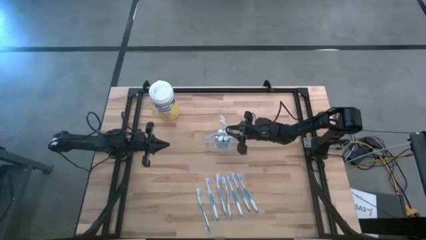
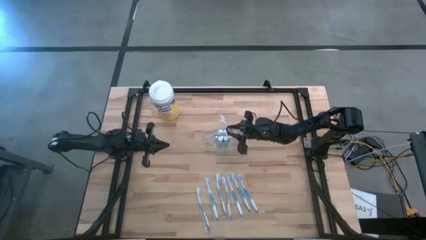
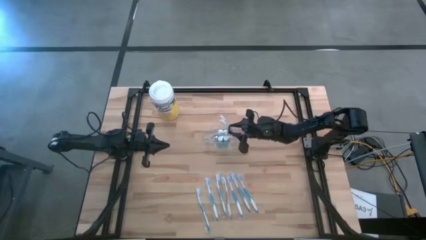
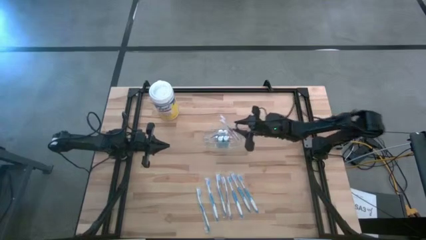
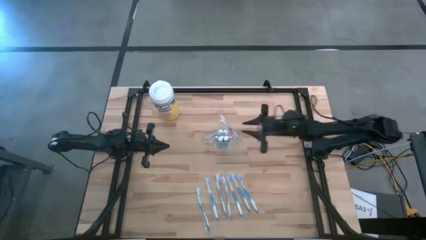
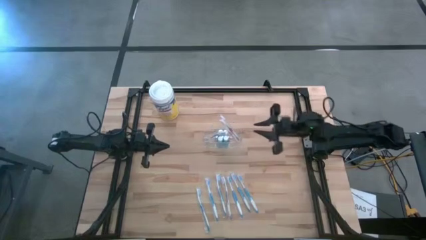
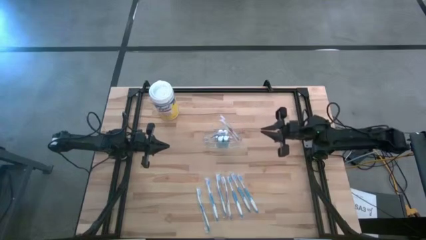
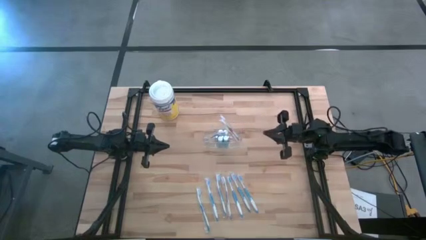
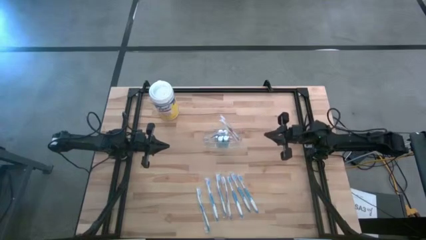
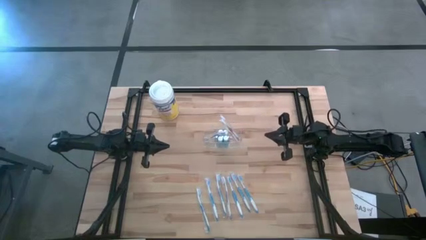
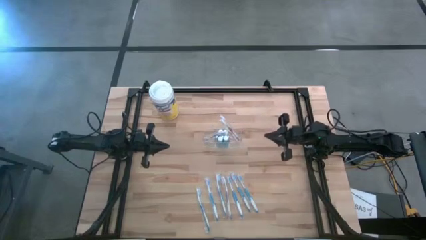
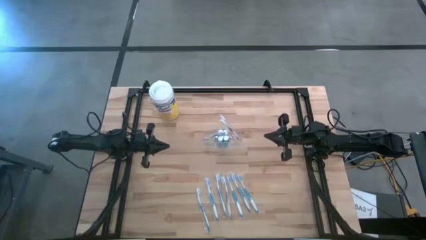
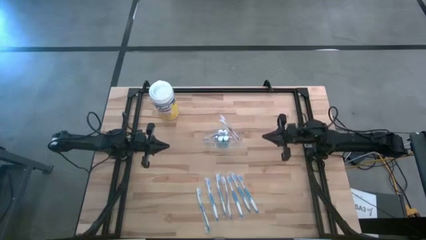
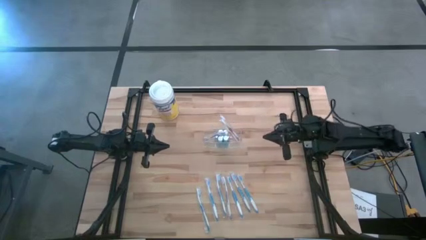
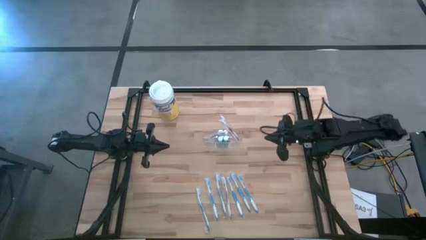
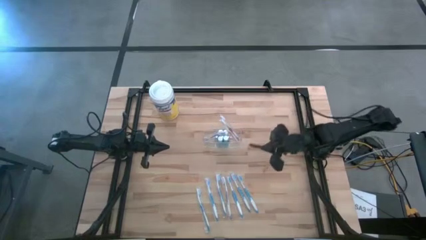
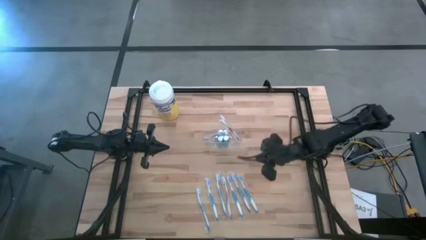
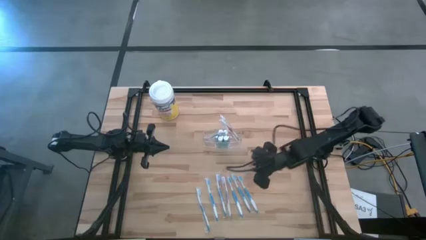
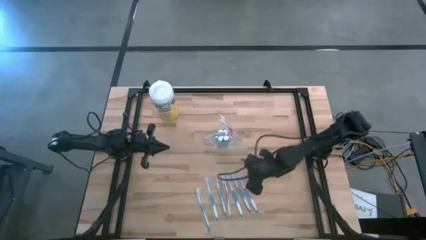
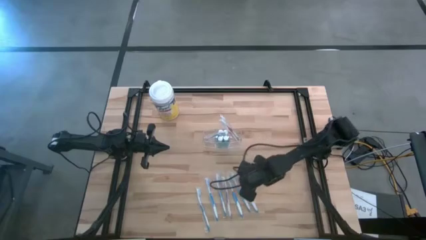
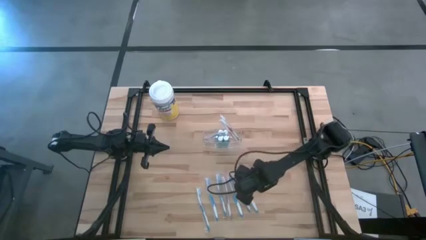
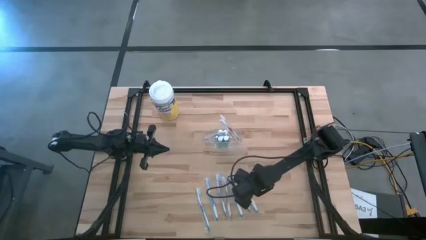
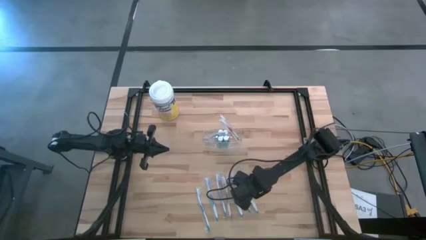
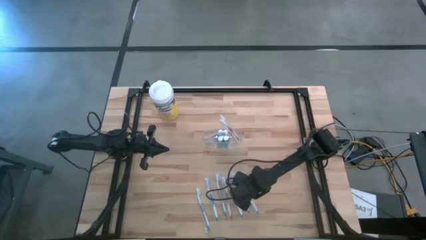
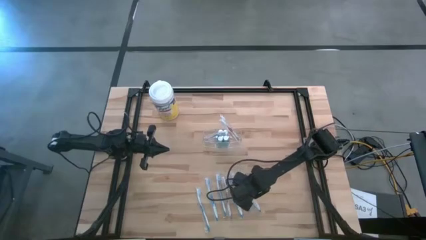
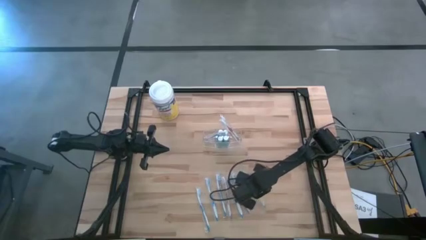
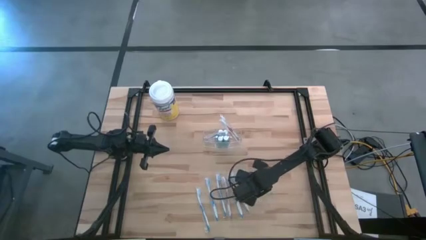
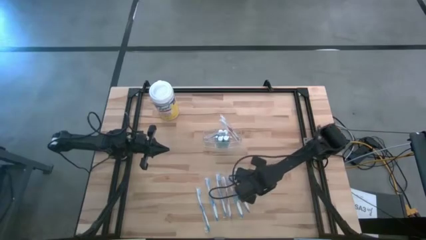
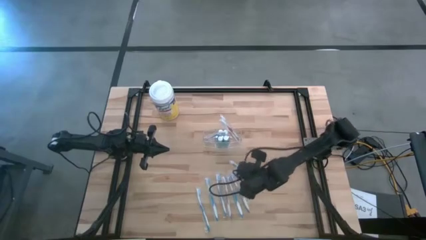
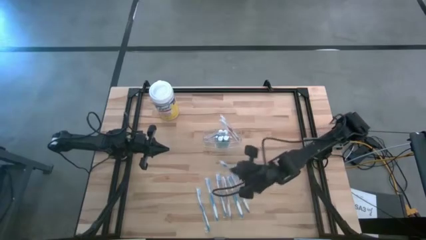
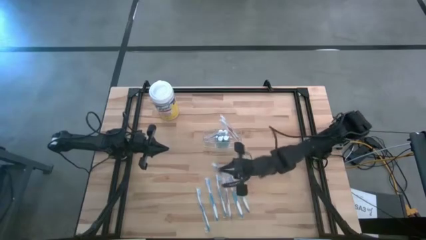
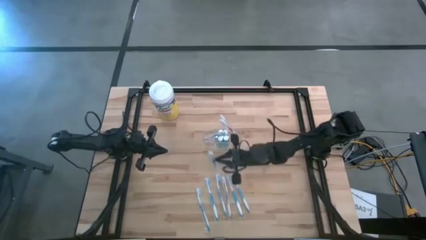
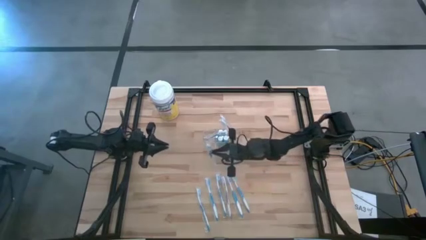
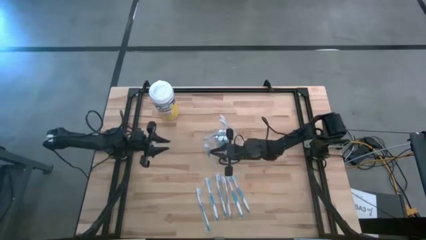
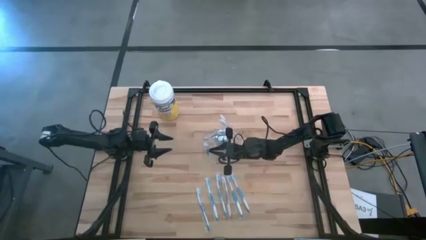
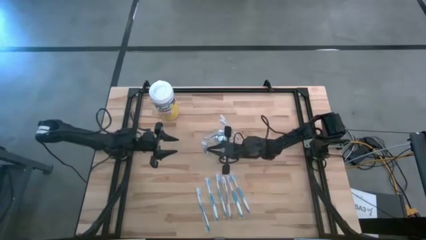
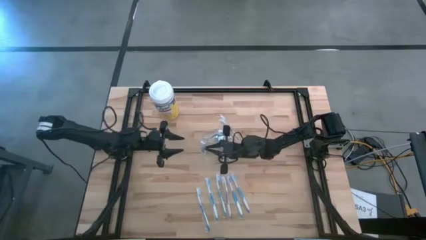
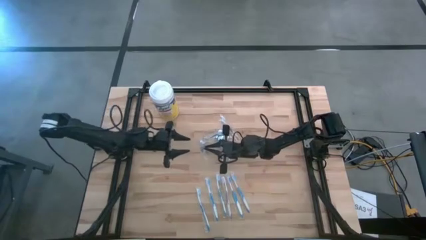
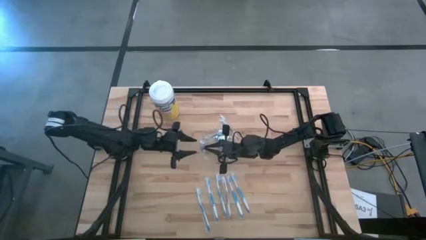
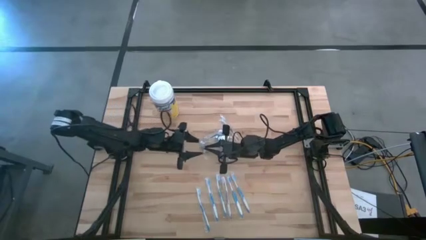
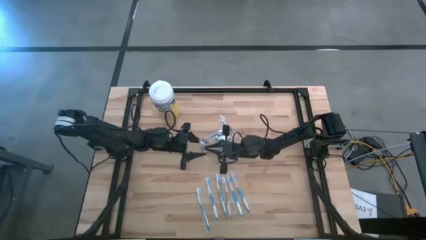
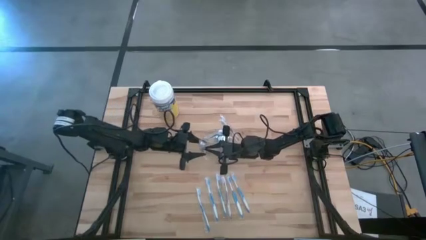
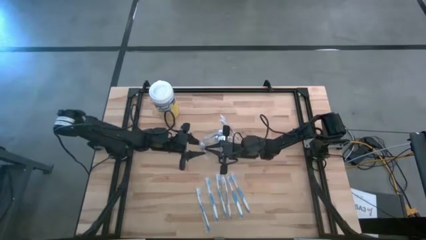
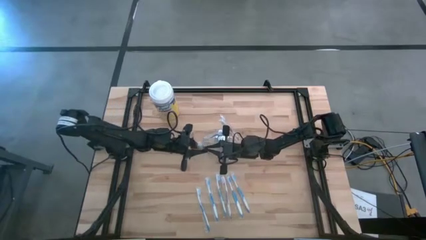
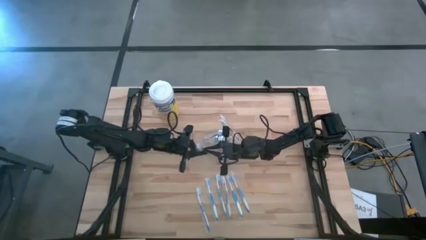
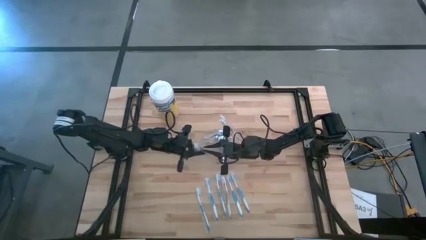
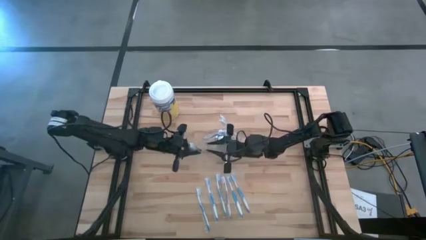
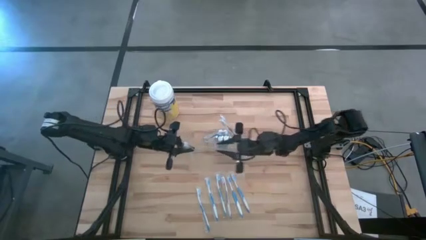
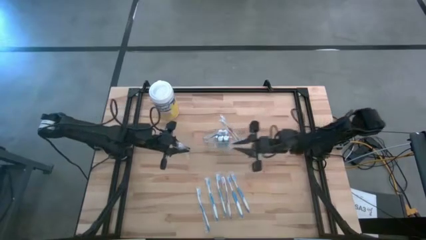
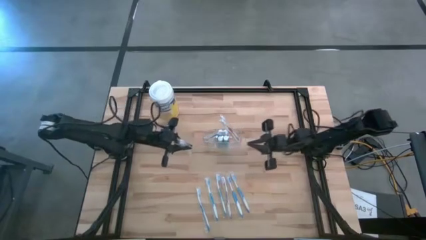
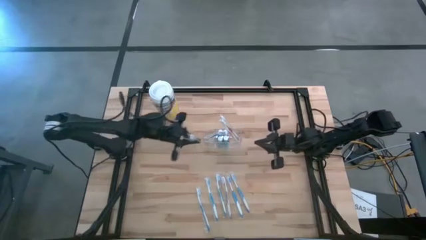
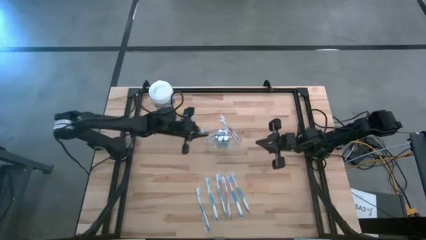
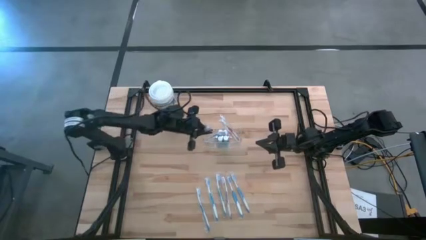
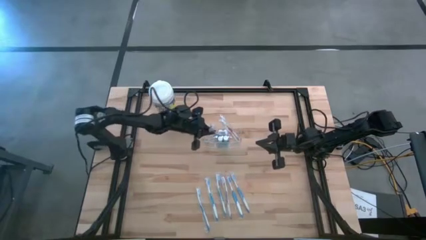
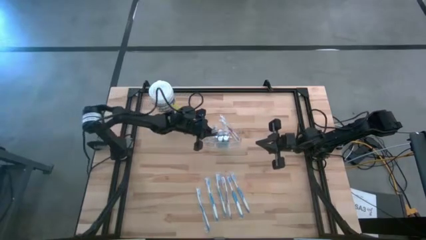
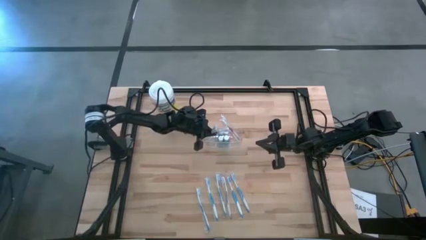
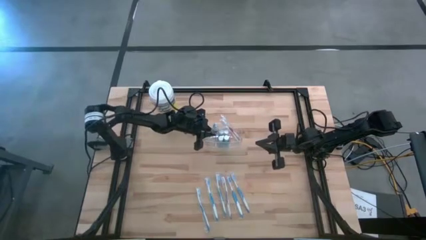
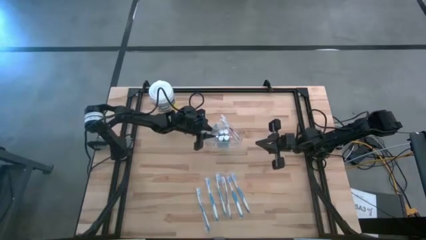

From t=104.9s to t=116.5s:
Task: Pick & Place toothbrushing station
Put the blue toothbrush into the left section of the transparent organizer
